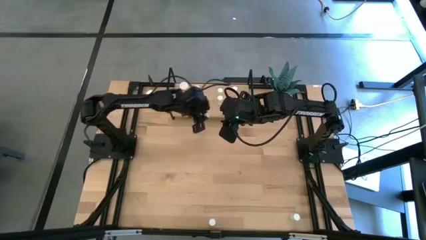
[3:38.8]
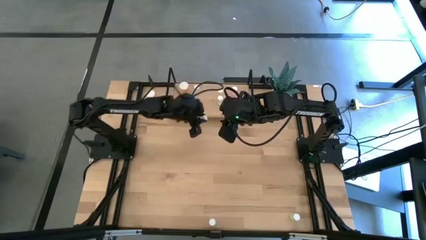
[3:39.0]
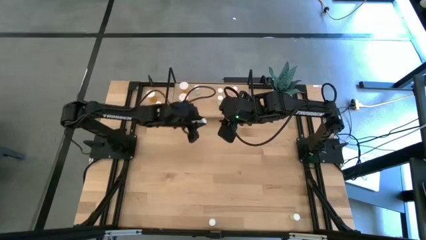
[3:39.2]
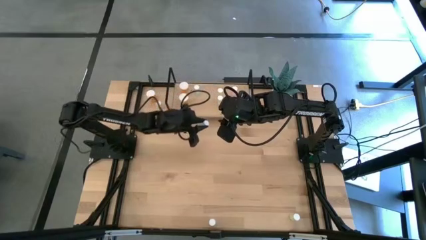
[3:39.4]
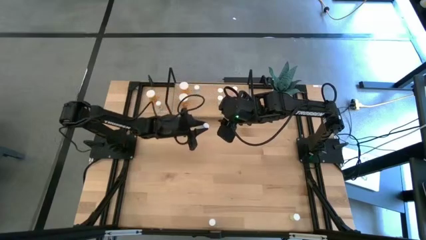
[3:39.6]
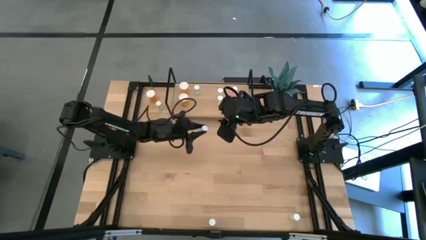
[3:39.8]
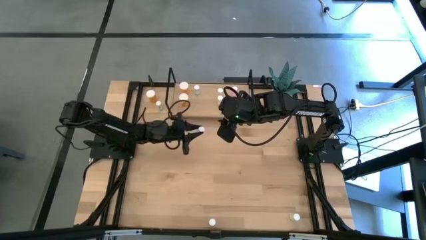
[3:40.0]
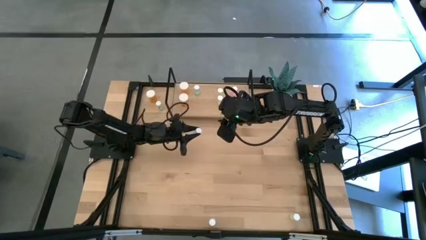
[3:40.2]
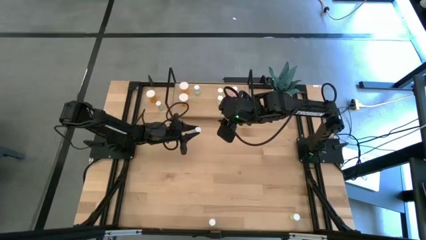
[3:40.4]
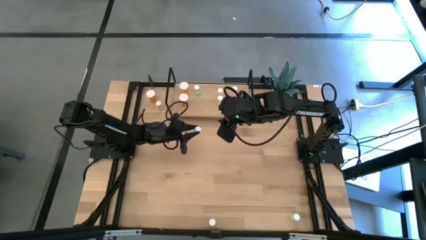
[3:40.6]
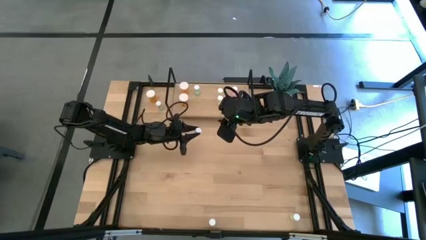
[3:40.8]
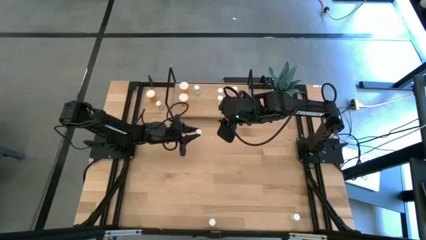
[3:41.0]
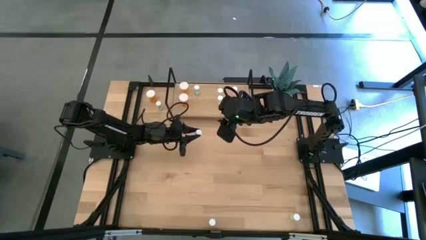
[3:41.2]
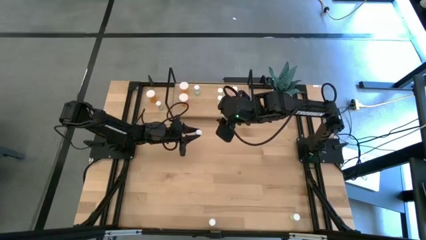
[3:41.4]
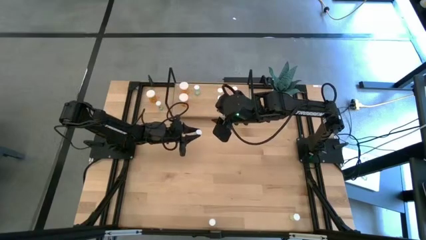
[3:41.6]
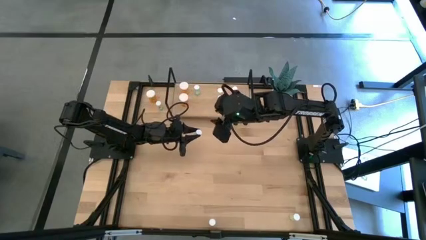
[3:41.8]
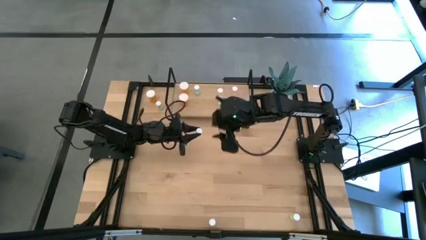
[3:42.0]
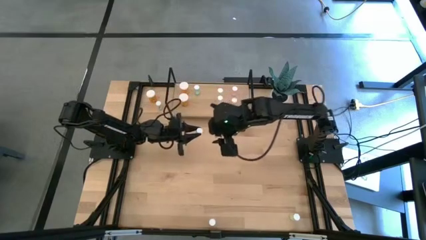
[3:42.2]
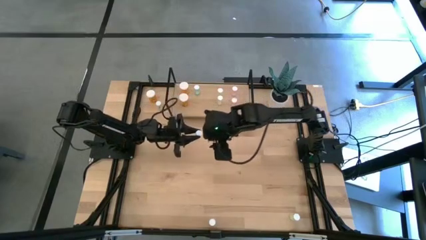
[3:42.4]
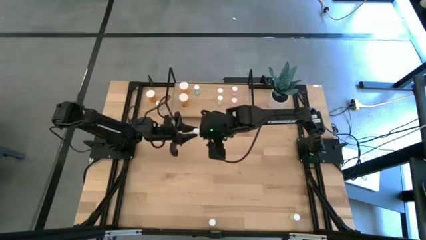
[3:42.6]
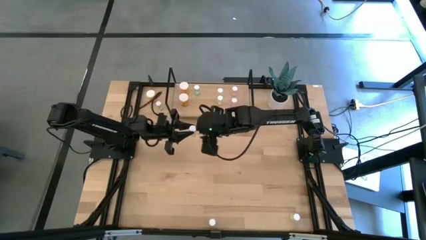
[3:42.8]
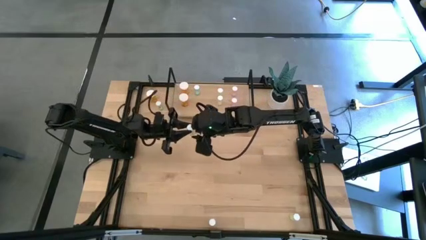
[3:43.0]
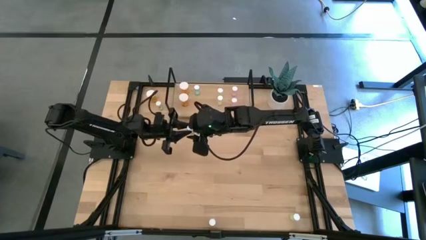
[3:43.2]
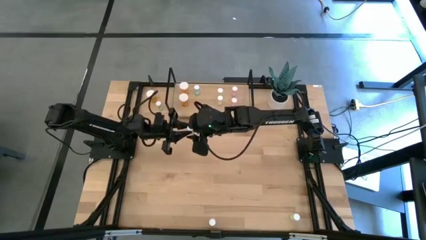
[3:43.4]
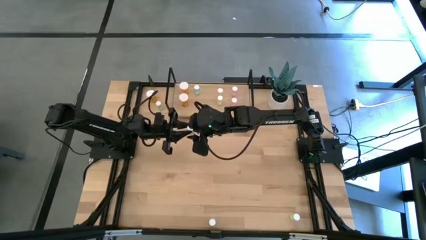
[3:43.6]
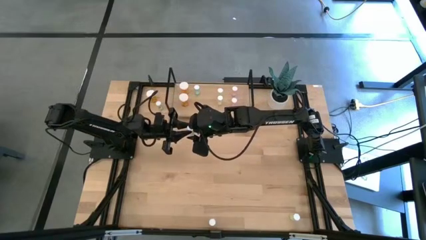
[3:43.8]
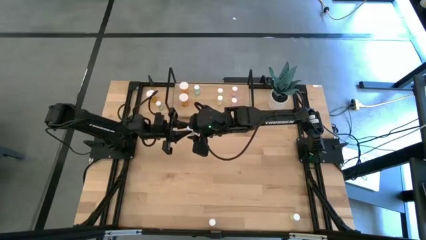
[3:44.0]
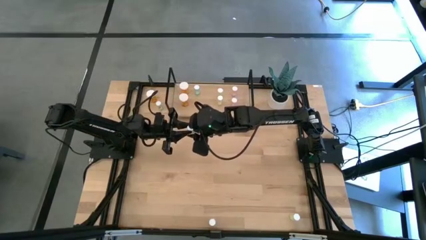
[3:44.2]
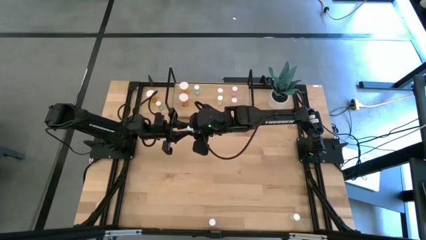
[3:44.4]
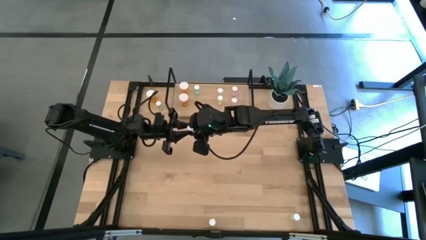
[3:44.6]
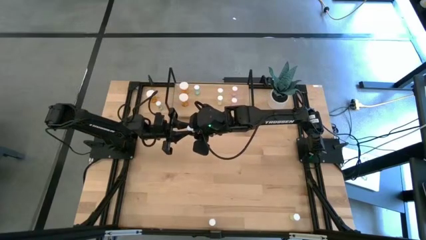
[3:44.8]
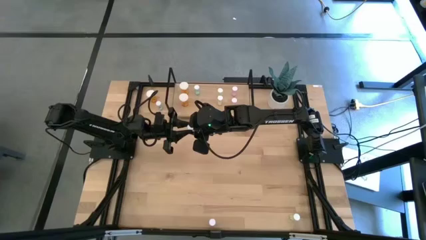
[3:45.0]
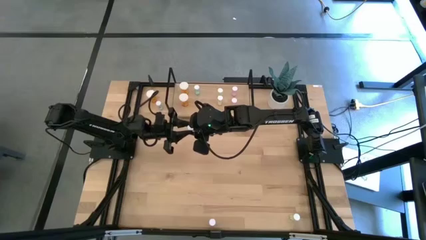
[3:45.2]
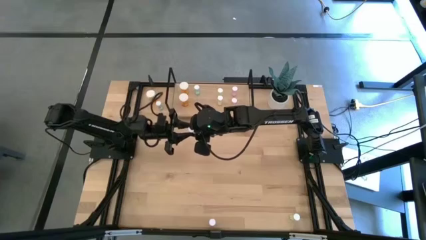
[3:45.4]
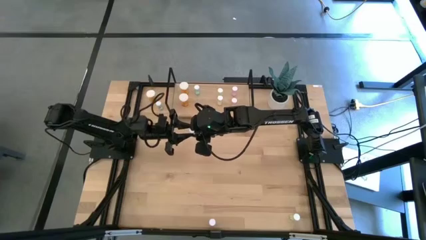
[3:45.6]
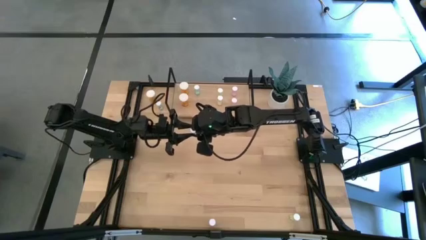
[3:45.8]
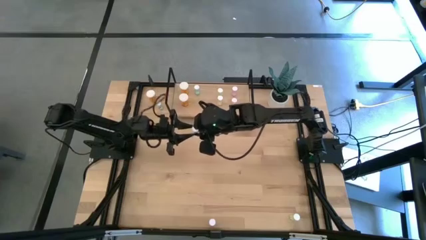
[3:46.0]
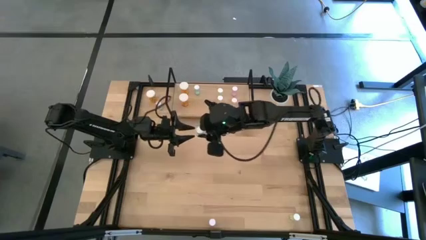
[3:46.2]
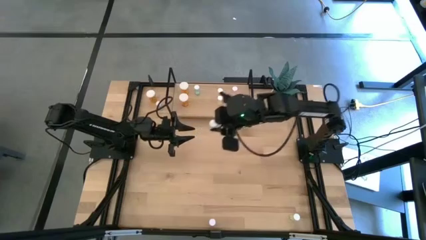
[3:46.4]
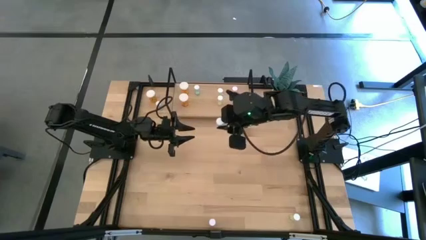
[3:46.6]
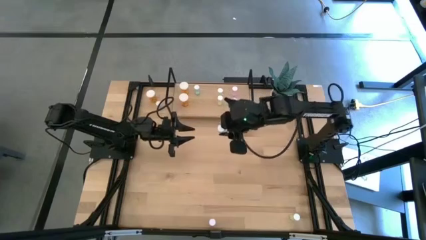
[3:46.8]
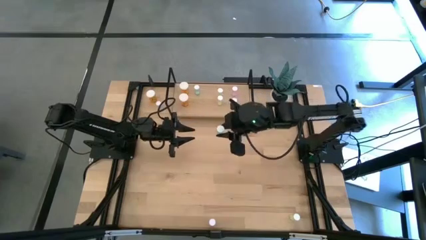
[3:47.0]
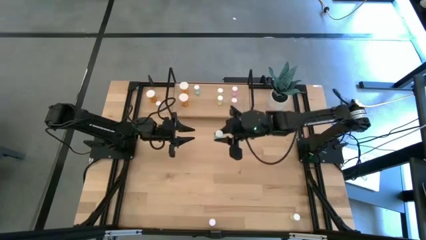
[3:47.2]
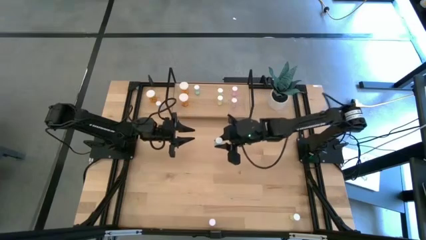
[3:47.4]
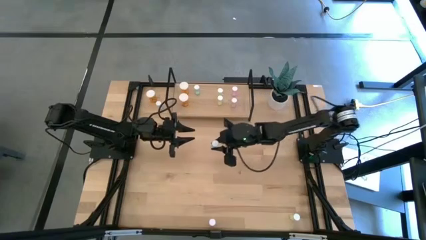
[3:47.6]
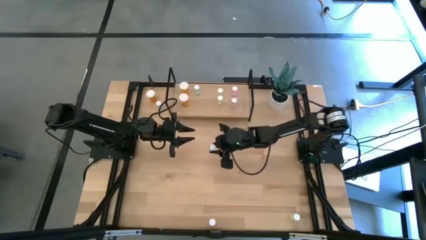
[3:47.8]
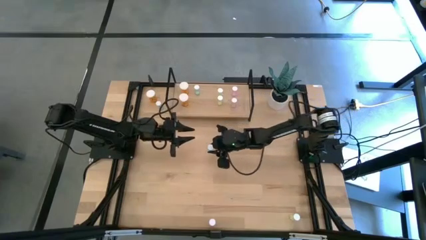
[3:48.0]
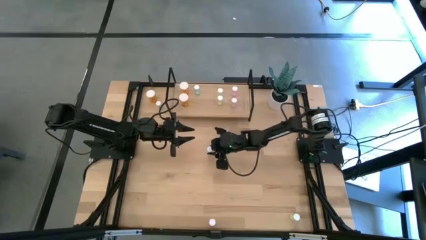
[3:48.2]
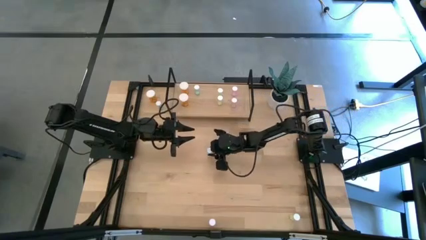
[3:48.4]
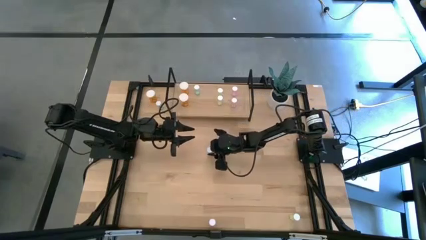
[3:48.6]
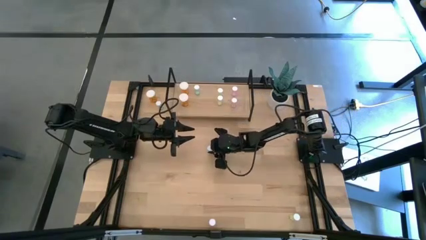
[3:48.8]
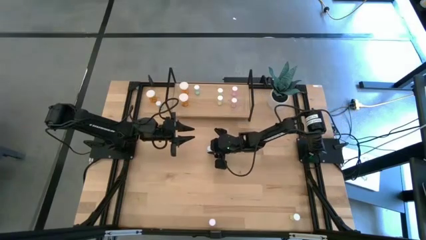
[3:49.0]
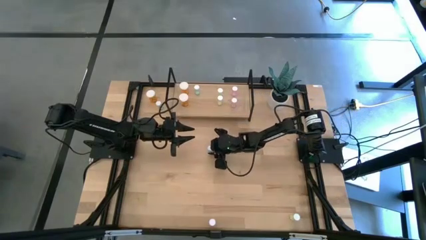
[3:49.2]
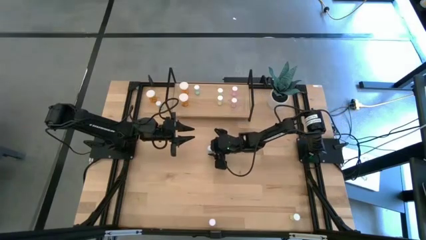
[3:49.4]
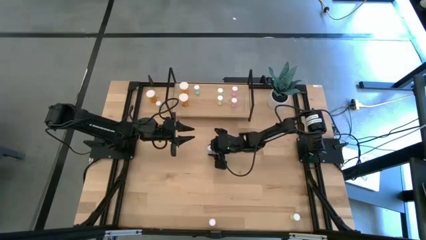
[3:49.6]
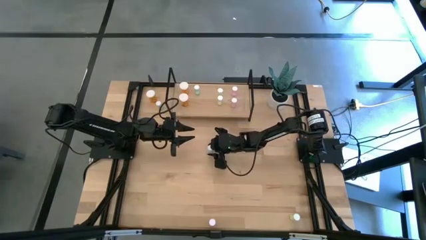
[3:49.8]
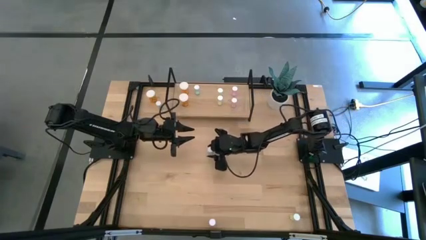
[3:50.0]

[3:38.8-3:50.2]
Task: Pick and place medicine bottles onto shelf by color
Remove the blue pill bottle from the shelf
